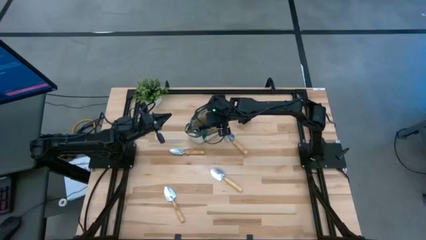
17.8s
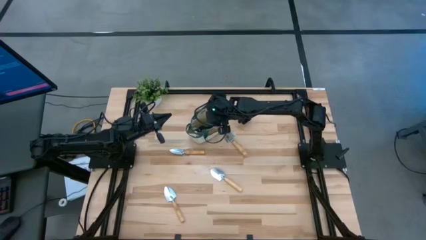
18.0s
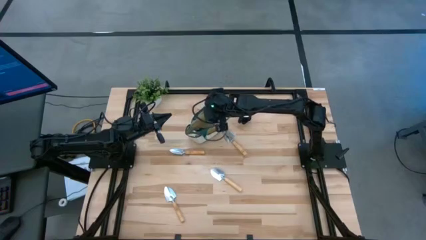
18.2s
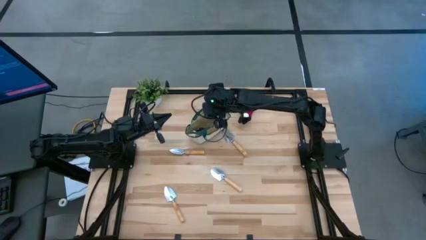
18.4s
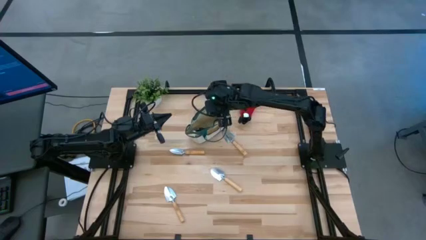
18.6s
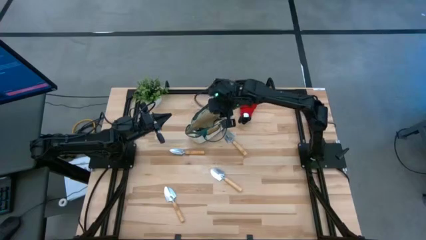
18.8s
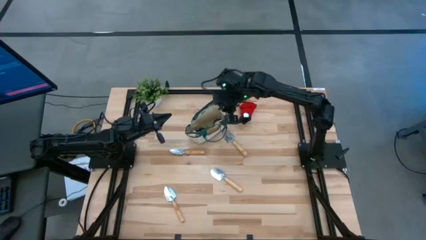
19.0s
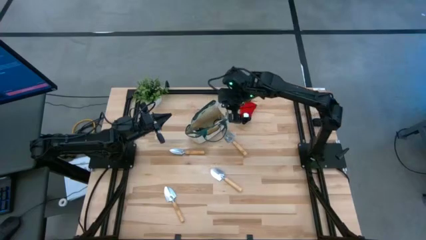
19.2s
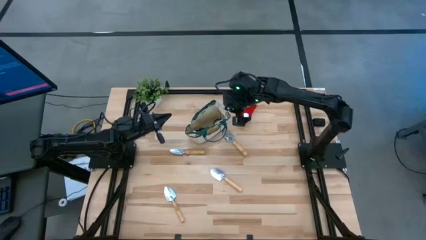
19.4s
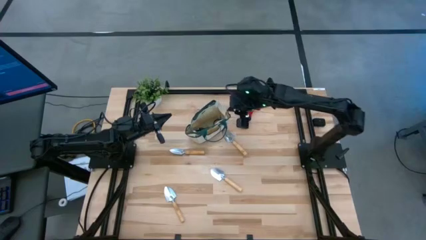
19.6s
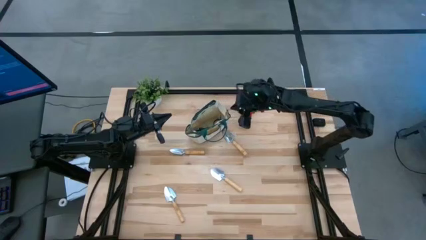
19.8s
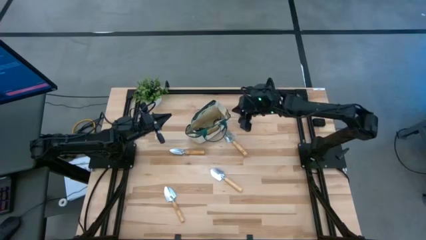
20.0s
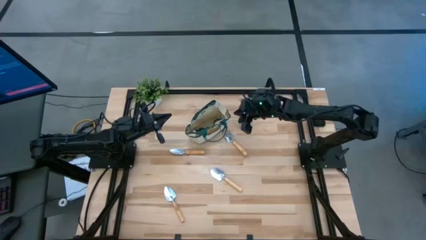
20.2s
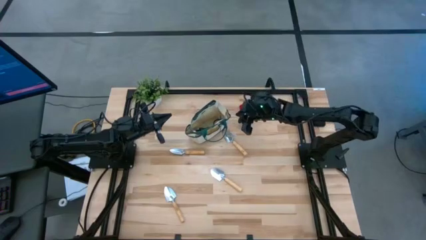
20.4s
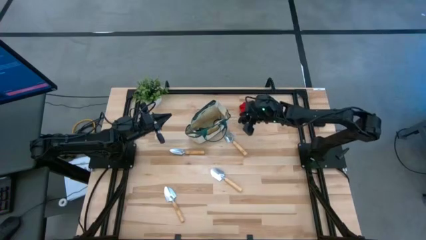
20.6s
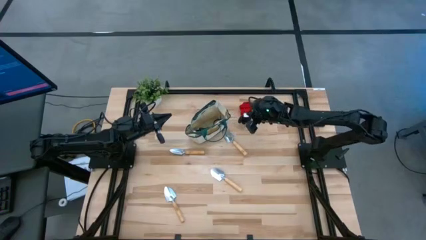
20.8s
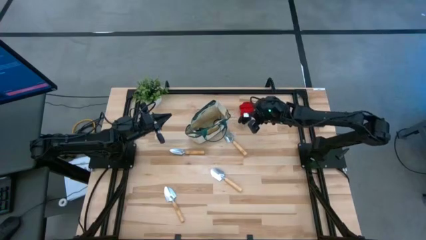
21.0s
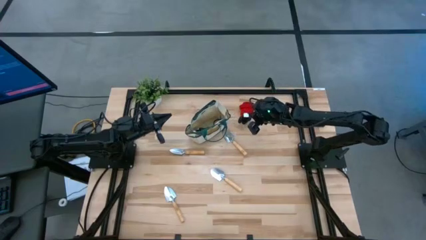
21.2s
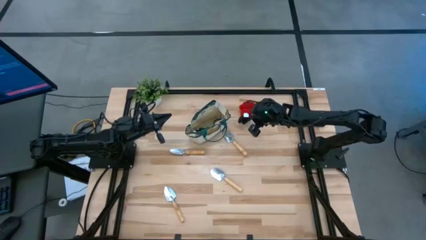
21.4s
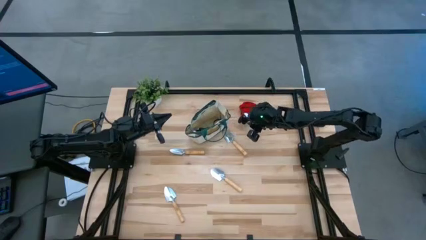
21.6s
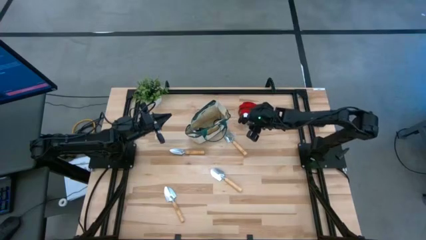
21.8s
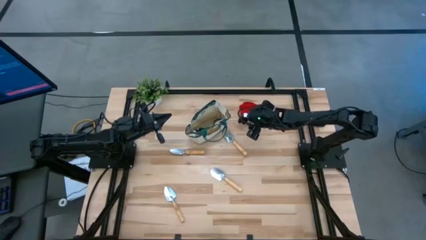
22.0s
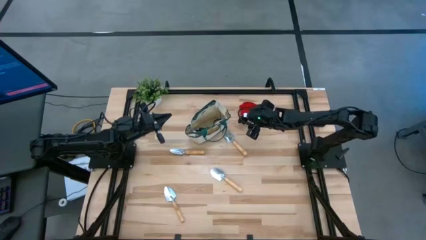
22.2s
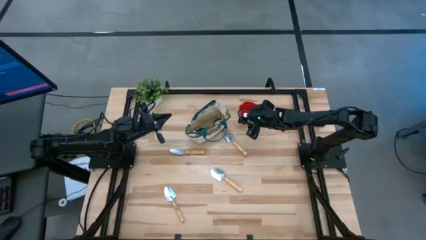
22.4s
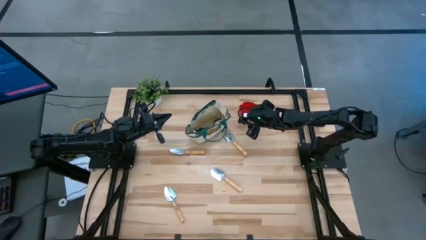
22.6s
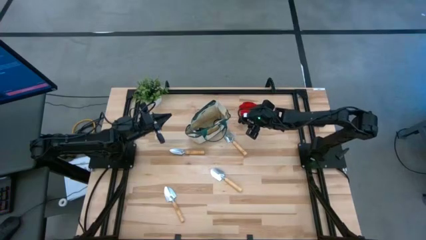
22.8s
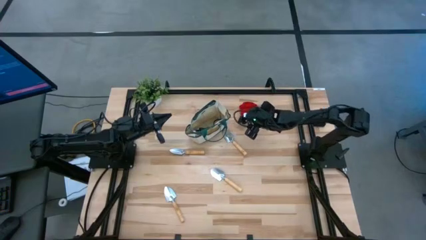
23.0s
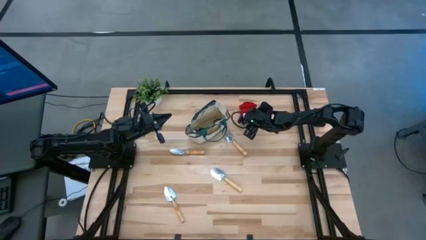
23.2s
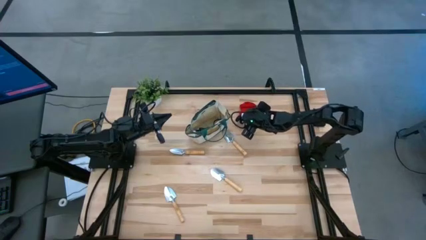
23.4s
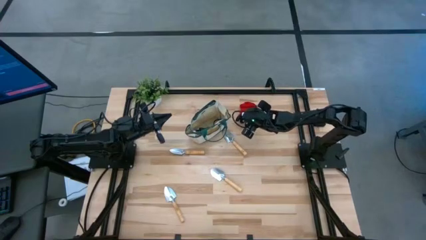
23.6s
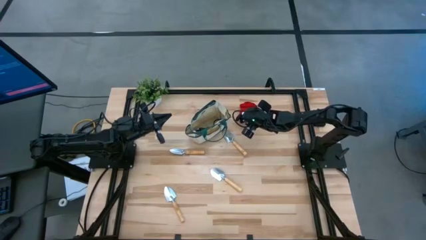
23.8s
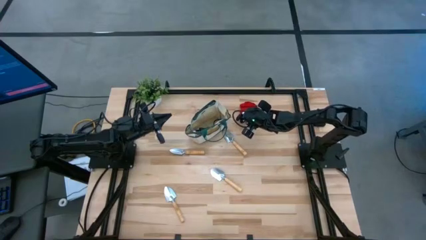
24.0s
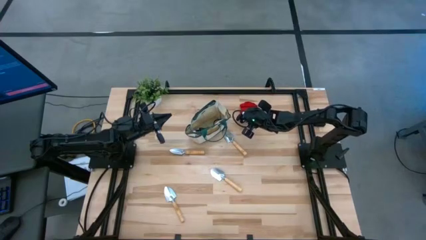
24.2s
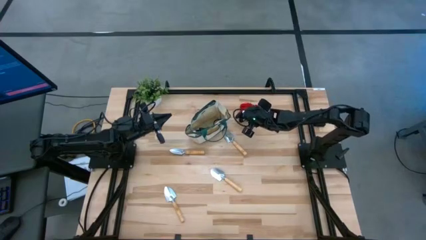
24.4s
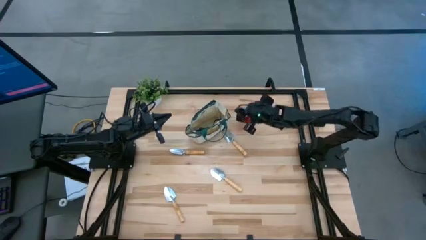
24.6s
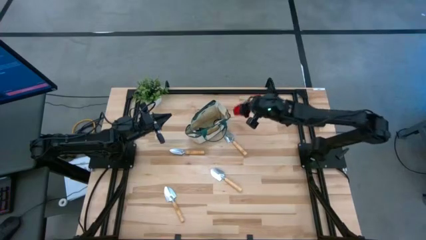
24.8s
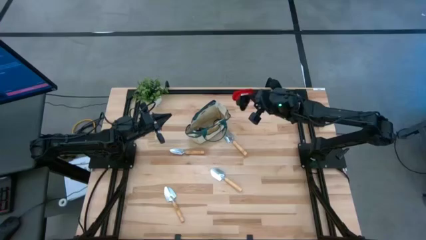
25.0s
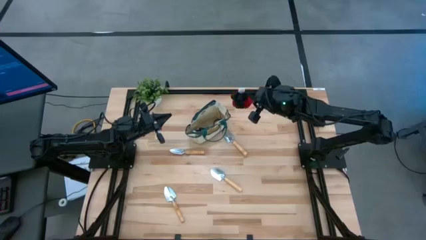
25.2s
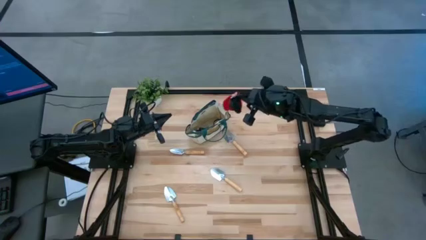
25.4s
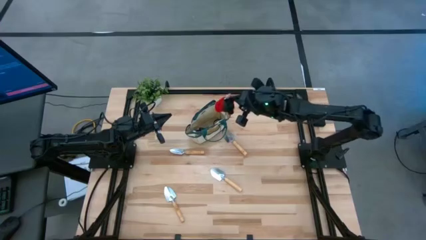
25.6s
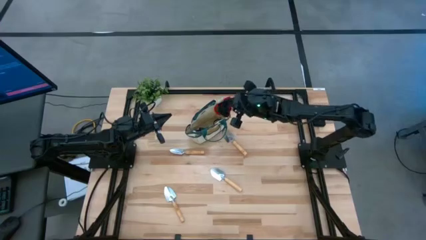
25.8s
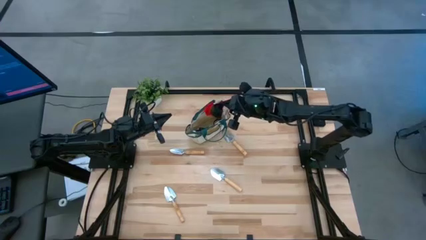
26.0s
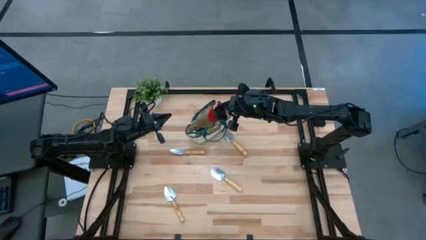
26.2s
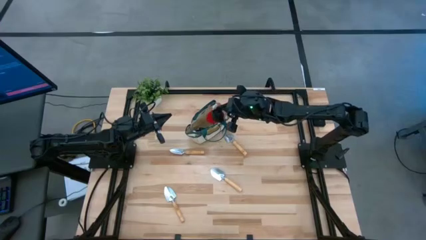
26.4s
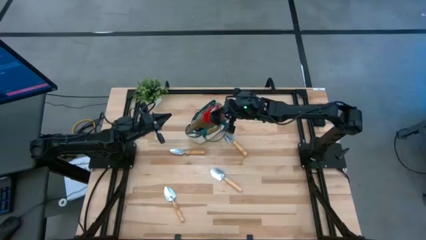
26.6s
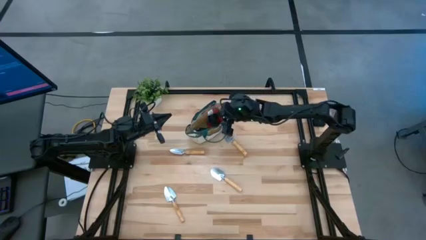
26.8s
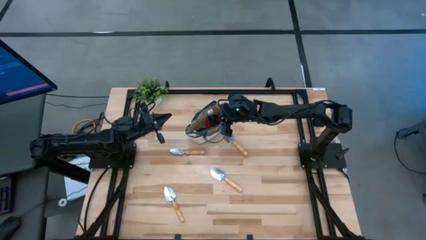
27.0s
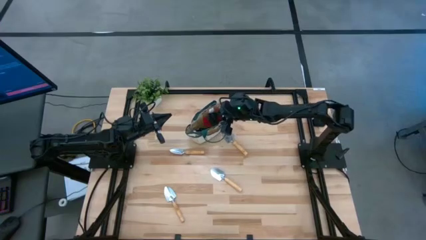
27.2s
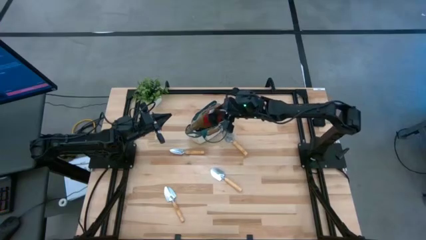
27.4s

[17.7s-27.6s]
Task: Pick & Place Garden tools in Gardening bag
Put the gloves into the gardening bag

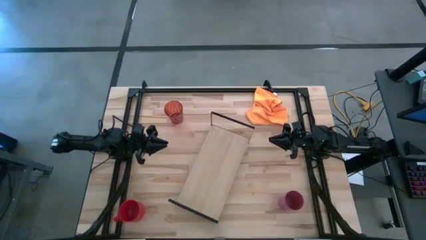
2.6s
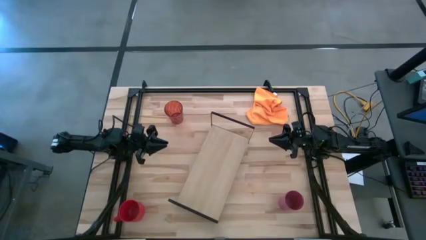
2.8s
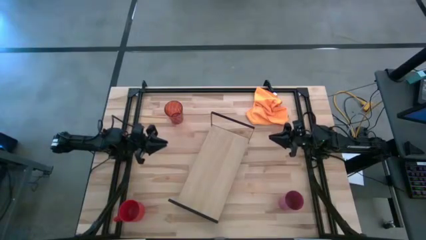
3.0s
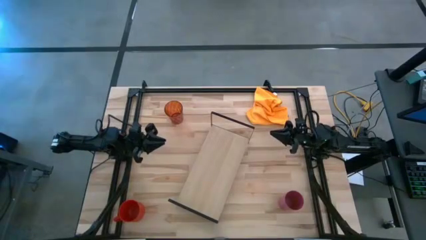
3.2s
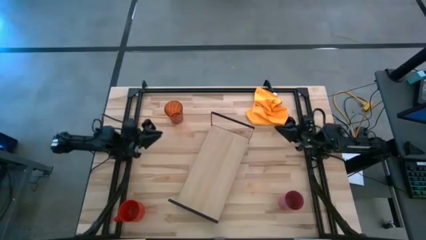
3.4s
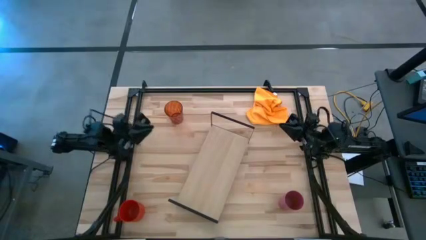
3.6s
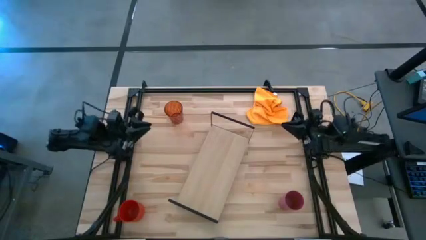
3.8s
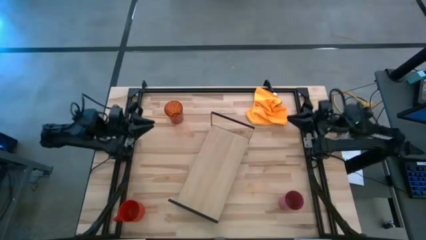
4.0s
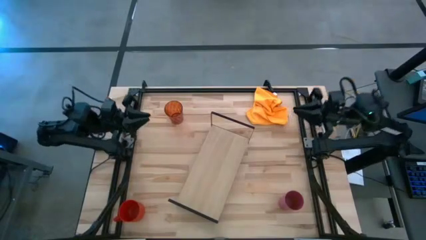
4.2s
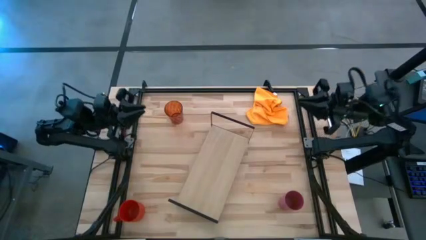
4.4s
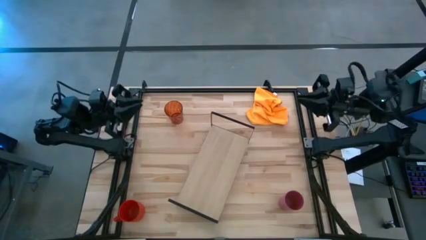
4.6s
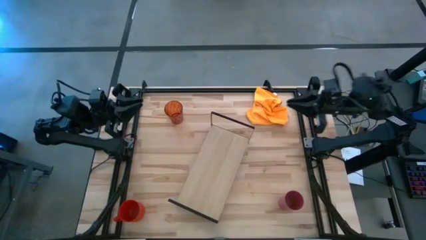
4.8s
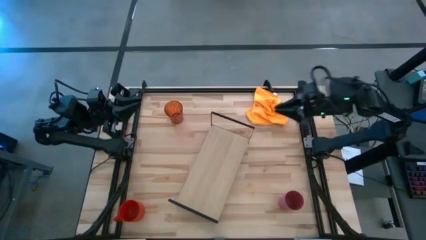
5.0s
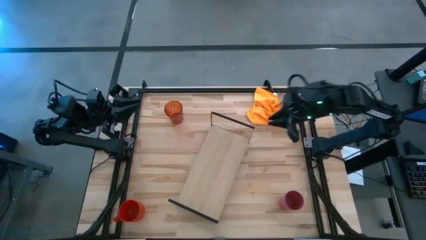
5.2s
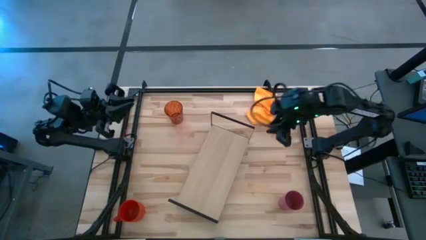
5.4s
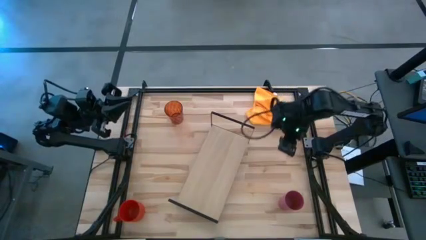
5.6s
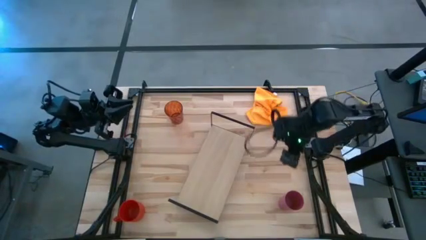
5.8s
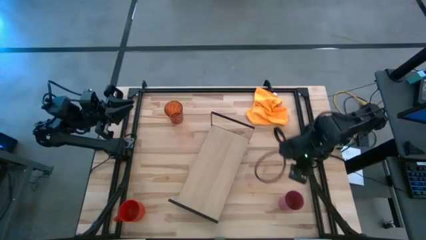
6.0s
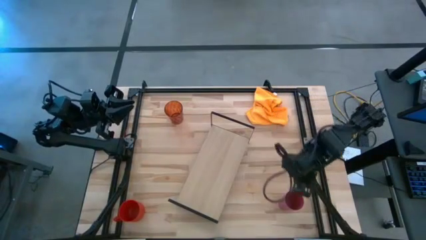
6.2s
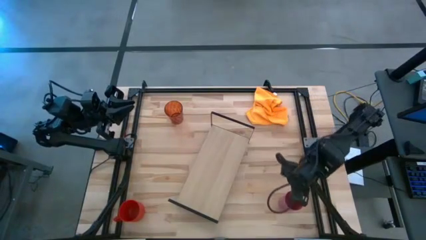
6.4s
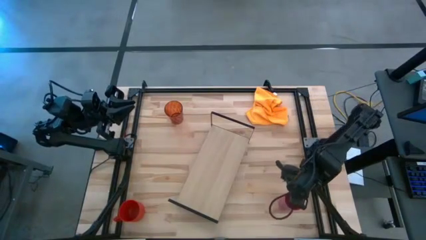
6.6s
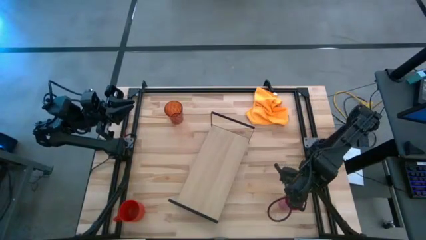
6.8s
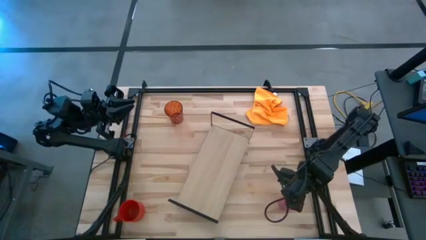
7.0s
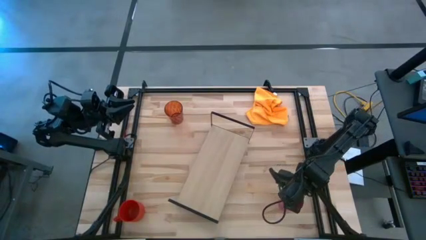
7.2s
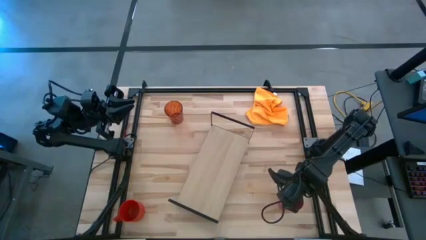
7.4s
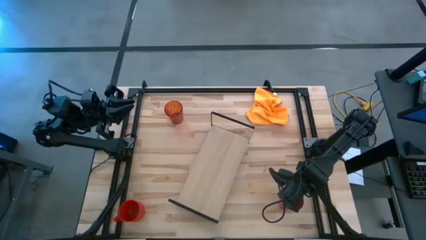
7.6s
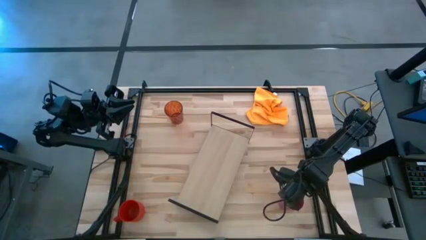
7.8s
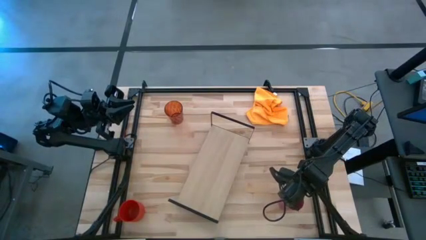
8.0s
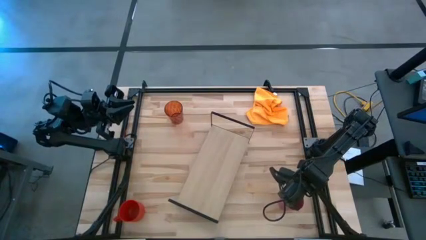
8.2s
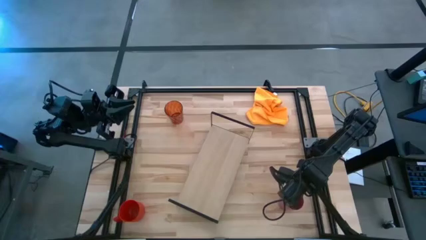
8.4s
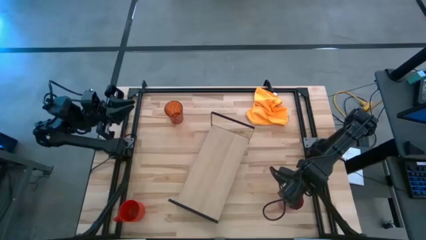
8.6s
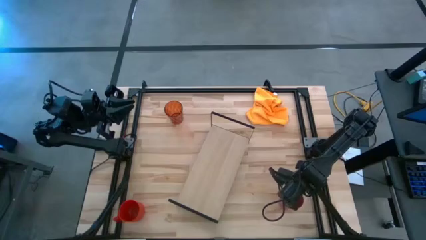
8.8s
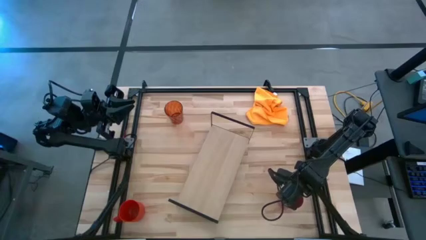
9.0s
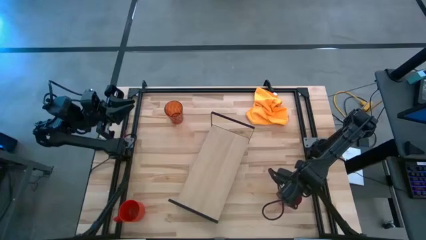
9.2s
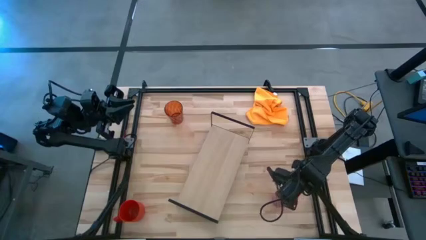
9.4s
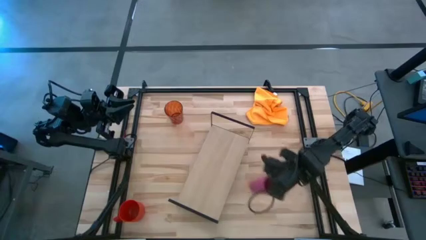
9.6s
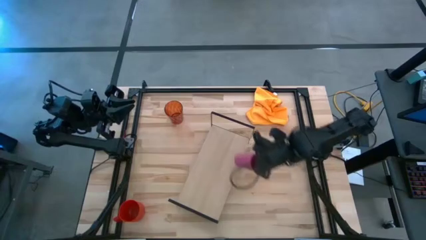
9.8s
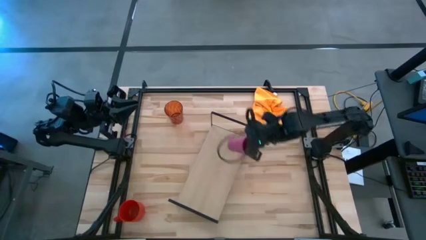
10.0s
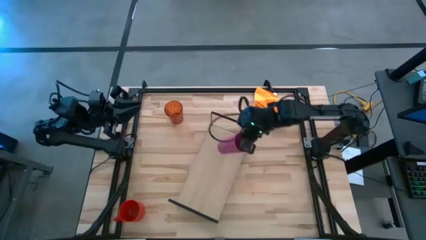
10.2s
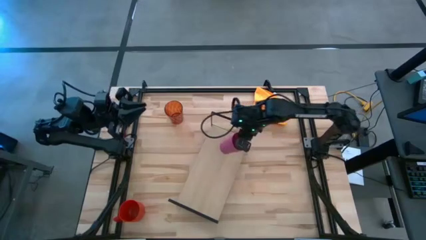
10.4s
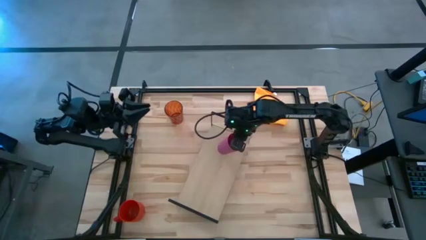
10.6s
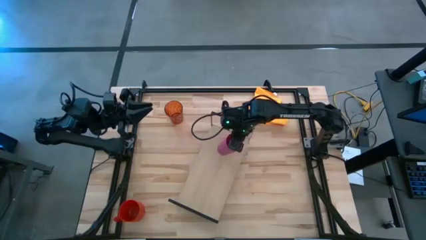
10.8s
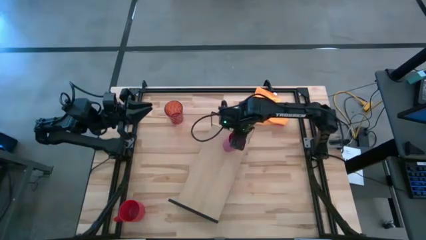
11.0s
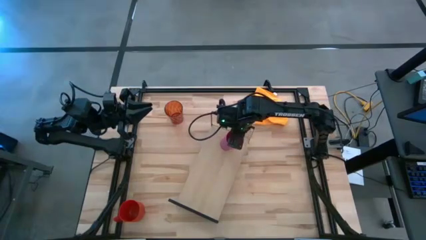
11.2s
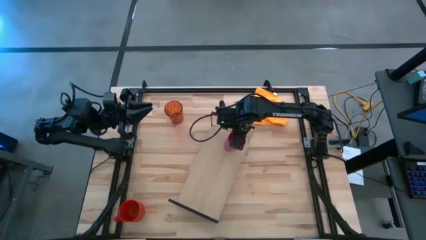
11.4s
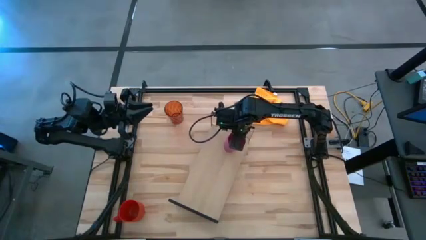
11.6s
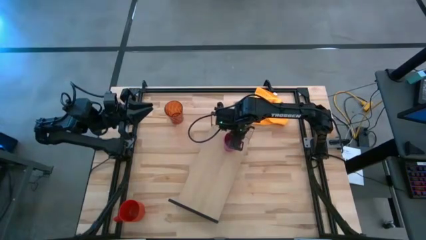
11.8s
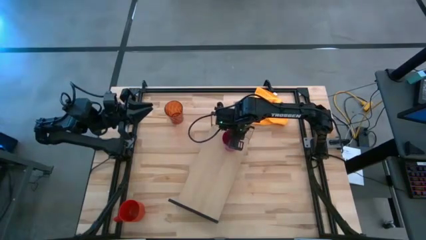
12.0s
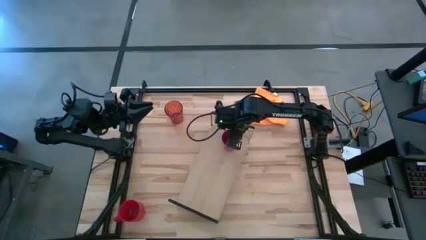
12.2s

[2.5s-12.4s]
Task: Stack small to large cups/mugs on shelf
Put the pink plastic cup on the shelf
